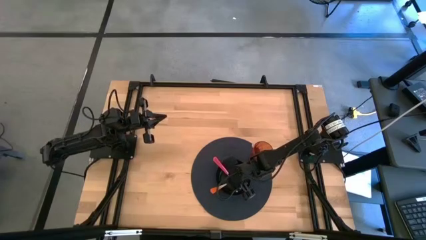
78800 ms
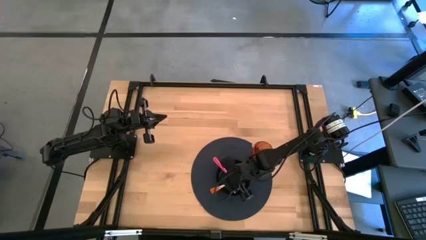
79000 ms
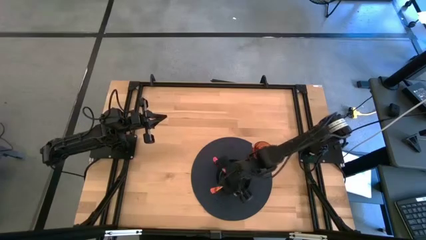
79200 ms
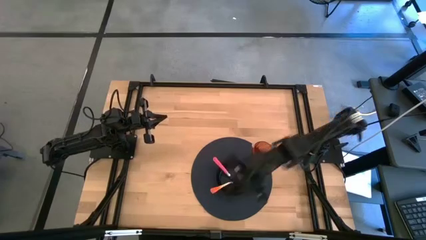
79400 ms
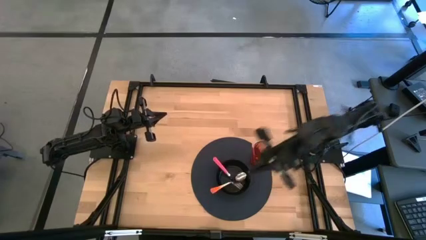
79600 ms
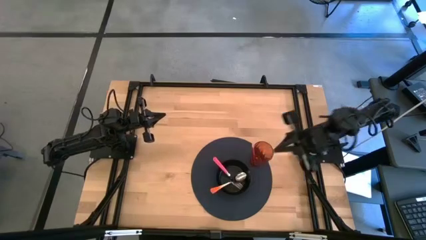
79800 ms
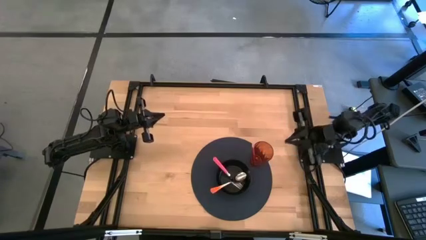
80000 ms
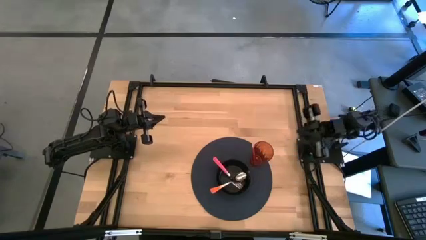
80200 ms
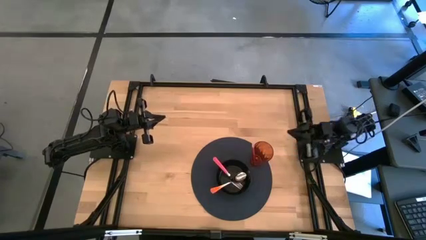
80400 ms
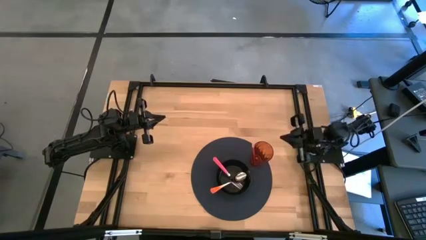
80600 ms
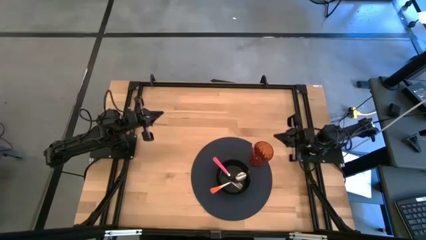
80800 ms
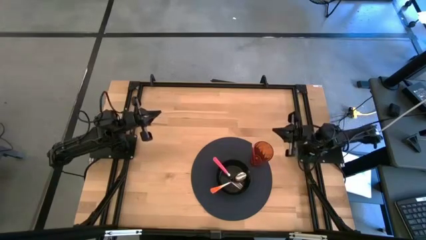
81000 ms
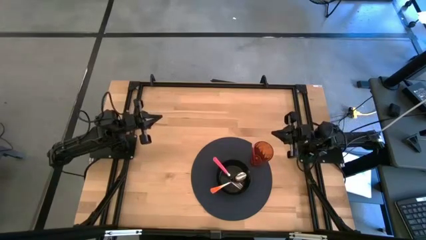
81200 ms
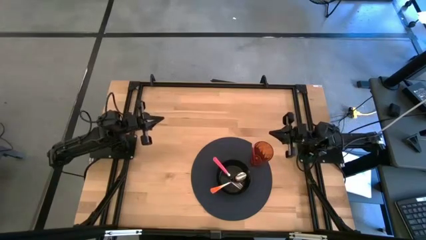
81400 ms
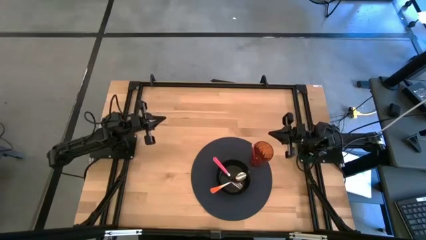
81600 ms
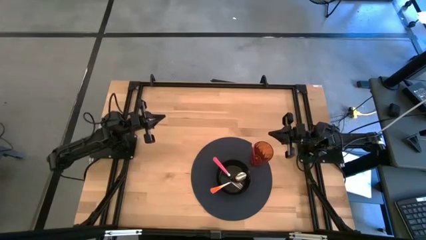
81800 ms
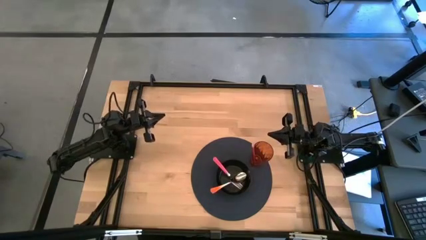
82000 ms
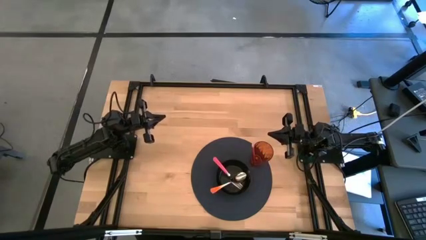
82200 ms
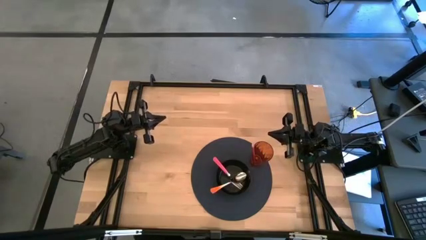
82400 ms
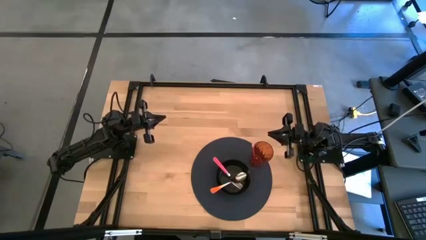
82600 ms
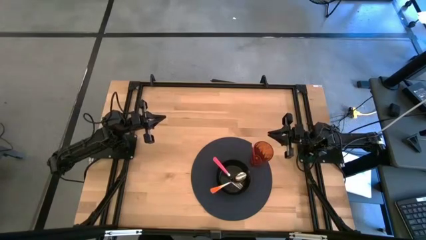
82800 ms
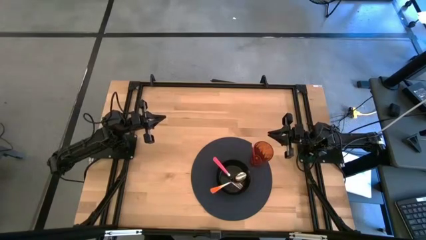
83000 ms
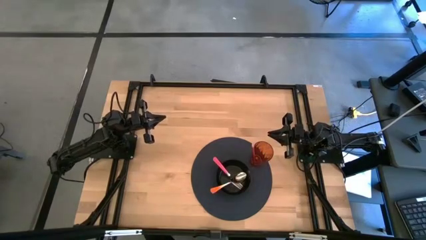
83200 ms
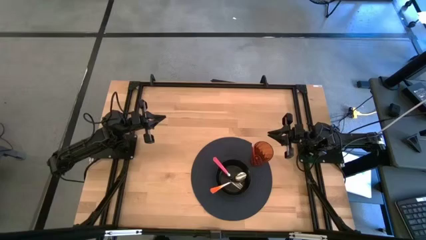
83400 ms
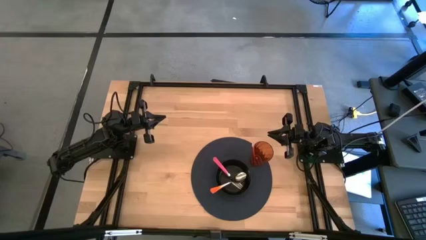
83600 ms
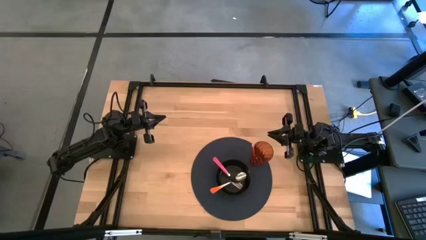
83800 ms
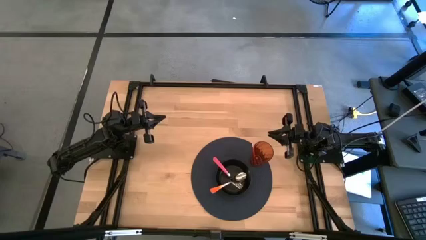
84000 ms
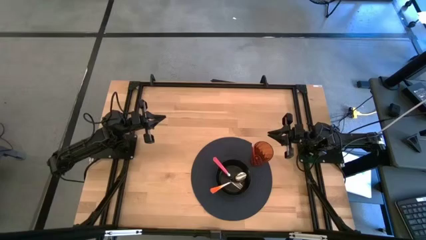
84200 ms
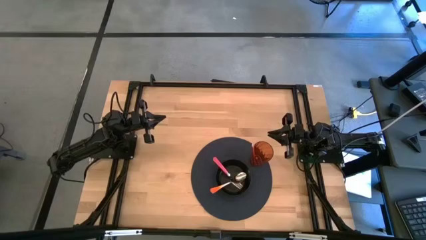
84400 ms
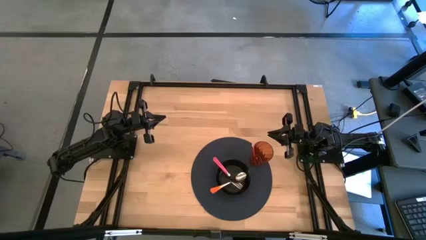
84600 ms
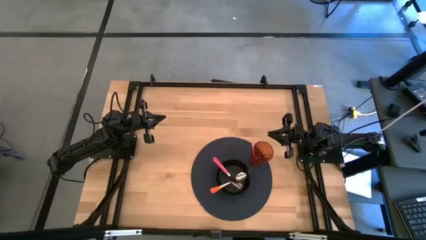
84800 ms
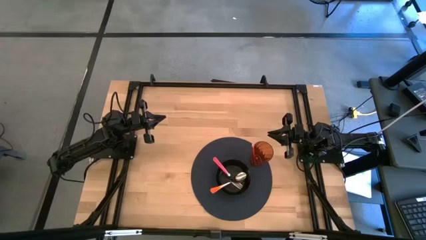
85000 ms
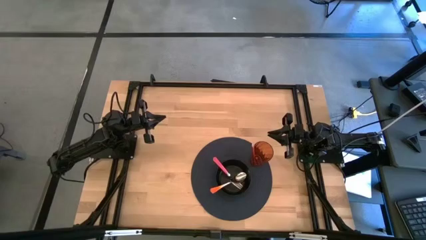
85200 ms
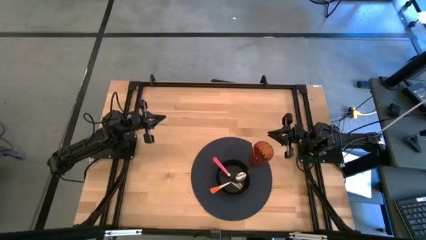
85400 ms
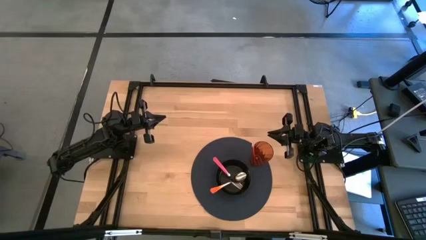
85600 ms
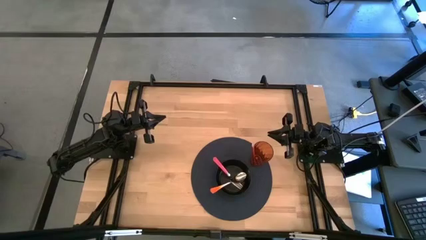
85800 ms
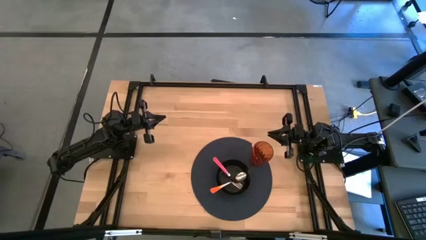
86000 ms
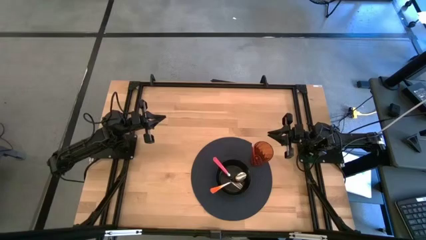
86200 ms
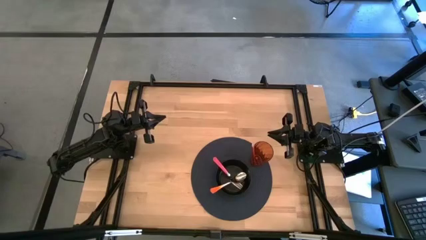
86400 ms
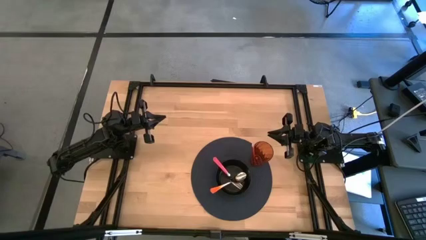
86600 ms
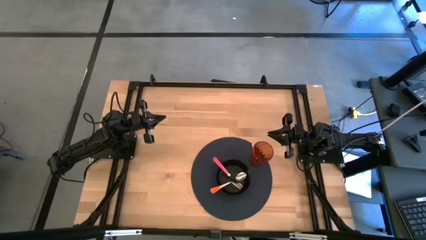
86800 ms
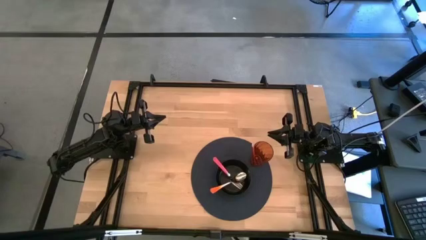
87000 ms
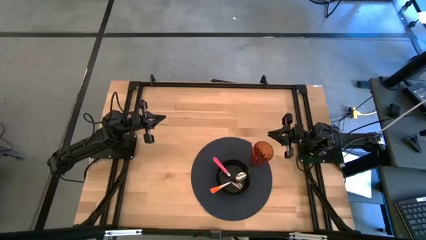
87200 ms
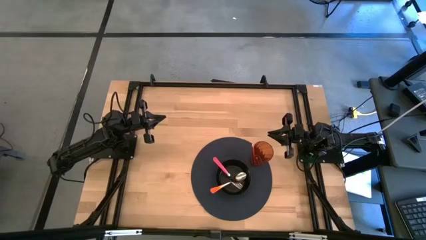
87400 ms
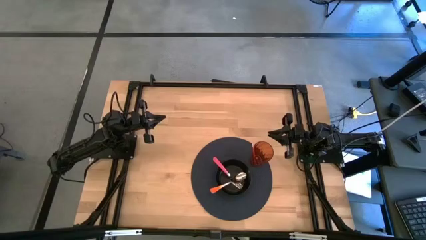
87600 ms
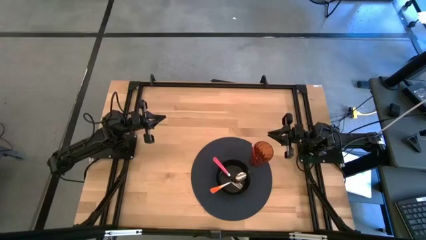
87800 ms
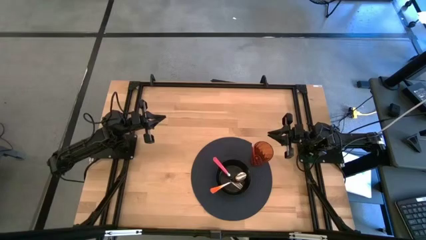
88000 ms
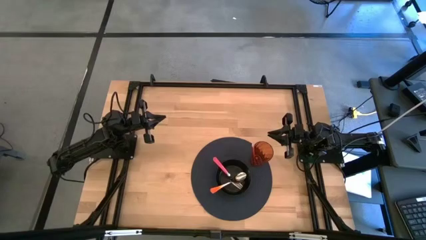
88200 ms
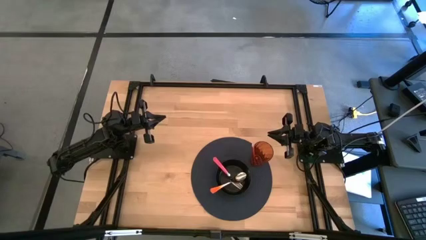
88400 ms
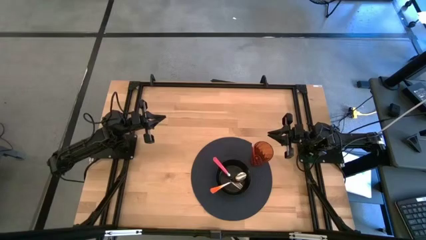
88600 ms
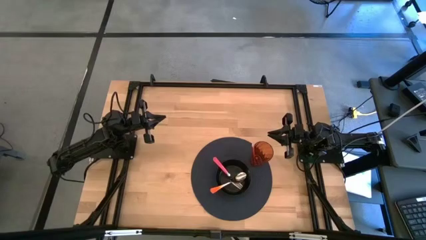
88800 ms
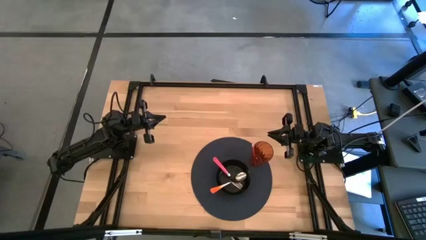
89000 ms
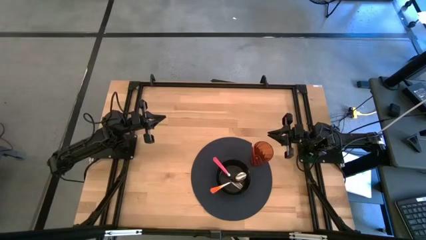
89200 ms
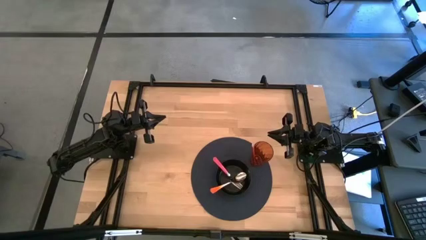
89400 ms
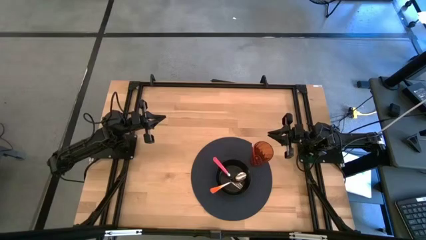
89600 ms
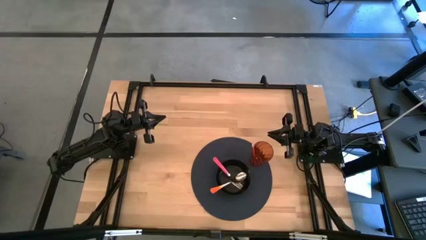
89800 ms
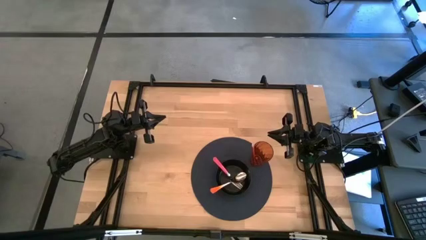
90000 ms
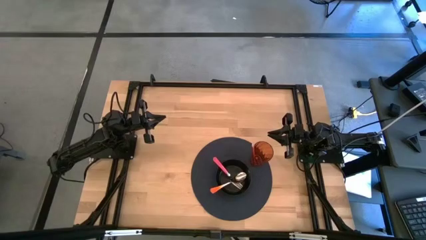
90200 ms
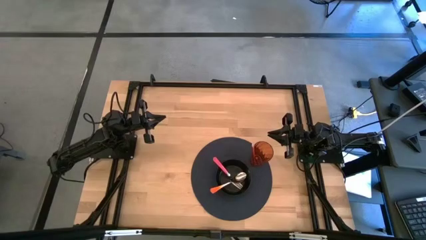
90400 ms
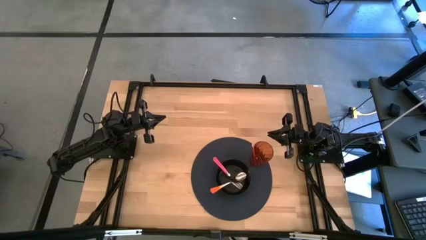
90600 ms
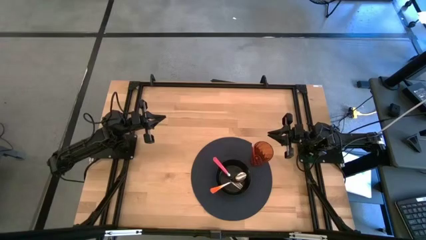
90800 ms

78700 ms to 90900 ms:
Task: Pick & Place Utensil
Return to Home Position

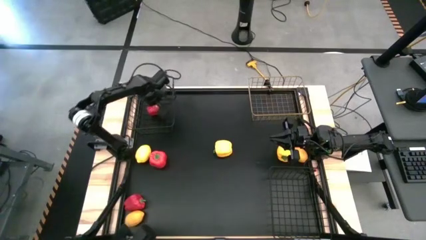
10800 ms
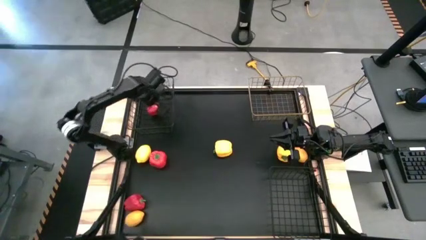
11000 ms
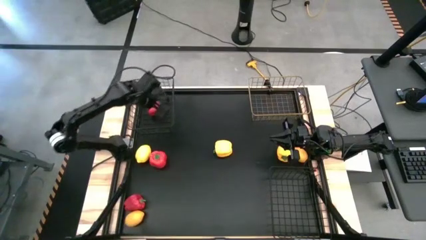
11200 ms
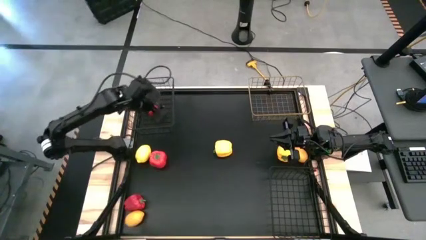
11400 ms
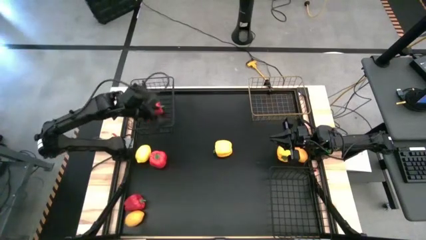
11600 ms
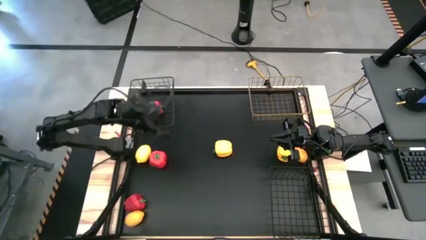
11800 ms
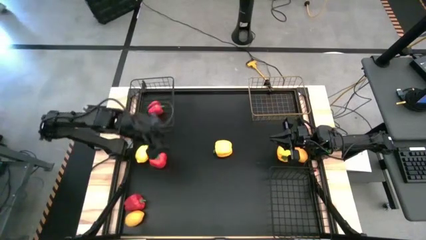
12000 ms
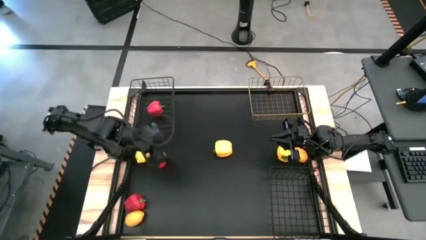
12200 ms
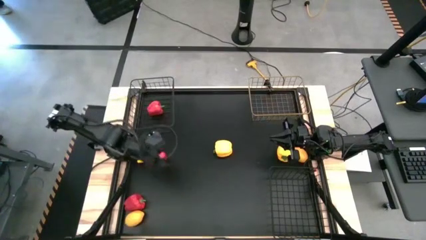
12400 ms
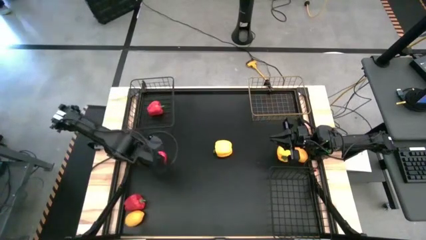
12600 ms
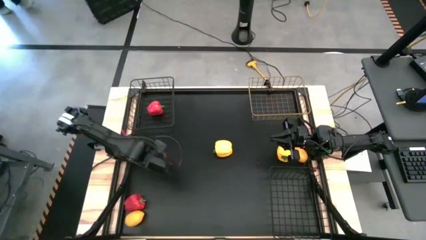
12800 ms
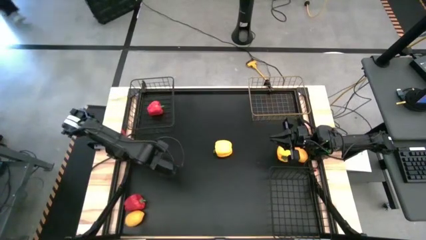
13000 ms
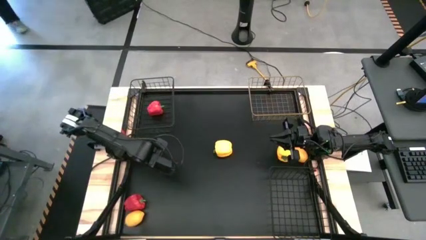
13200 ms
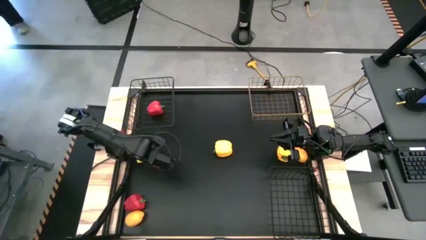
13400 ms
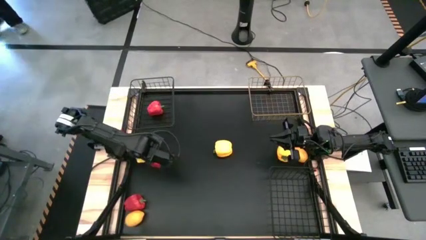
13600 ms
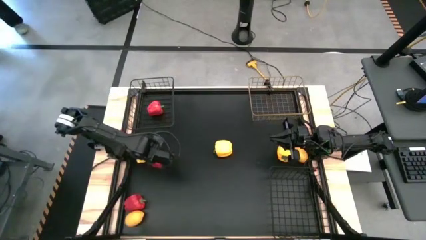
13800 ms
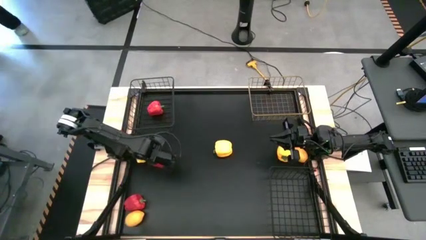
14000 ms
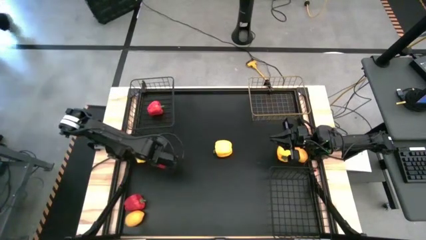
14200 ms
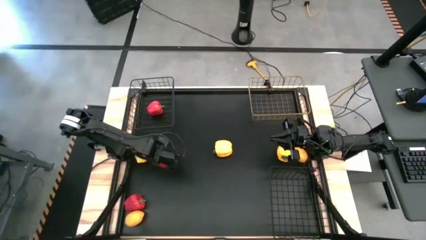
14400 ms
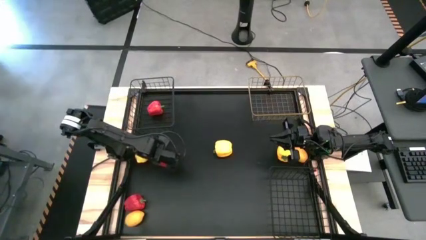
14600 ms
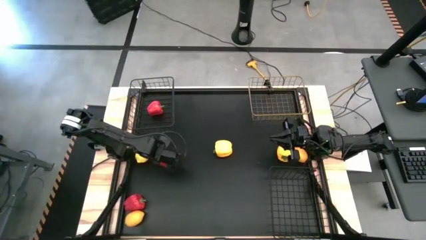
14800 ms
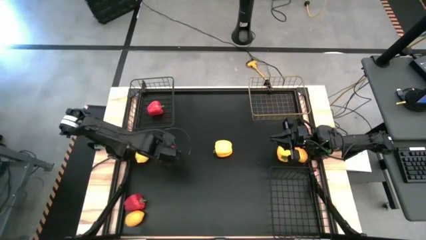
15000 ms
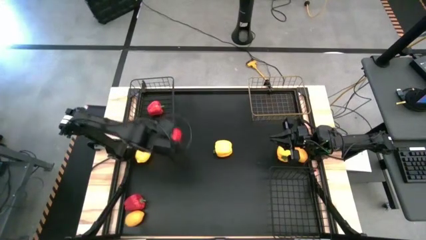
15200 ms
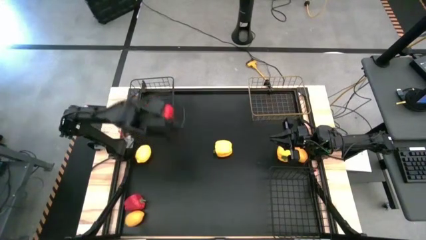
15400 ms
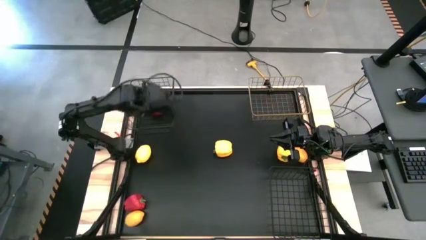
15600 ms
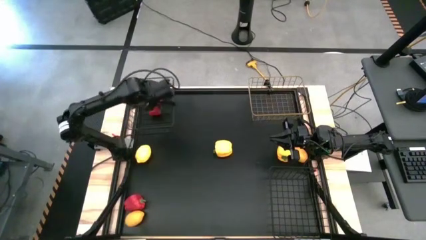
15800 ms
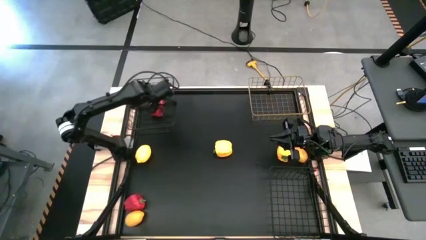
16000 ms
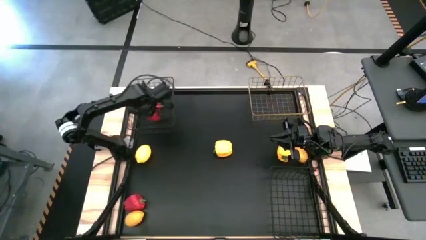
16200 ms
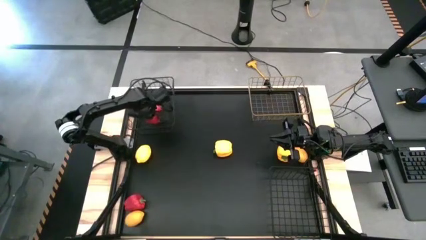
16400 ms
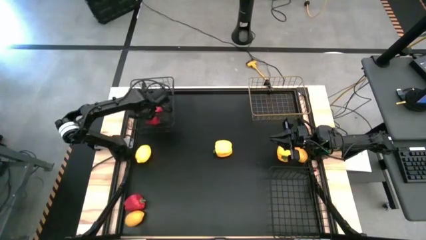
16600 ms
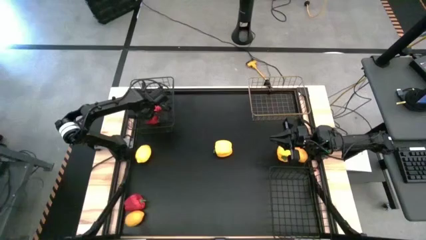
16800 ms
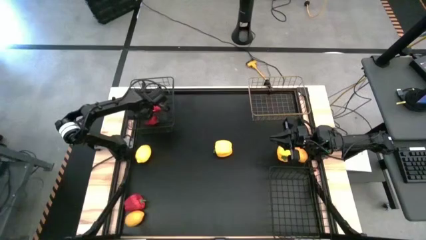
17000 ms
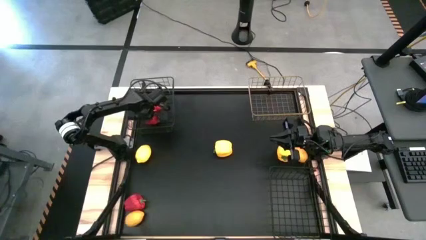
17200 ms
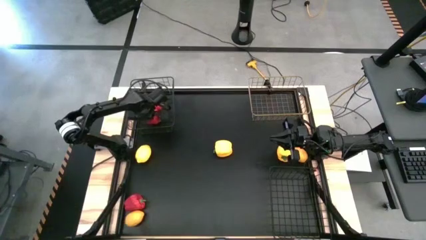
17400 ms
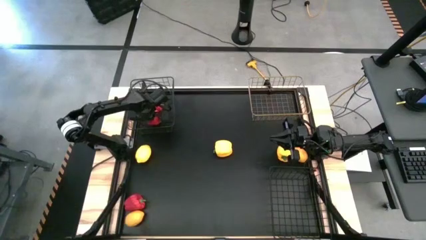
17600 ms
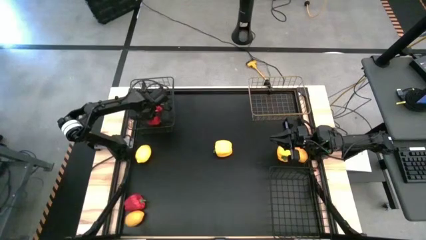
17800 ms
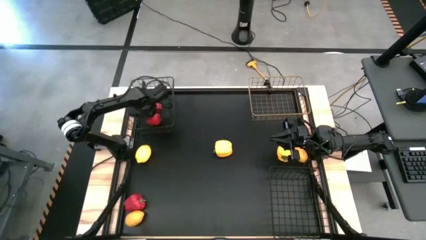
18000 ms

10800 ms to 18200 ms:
Task: Sort produce into baskets
Put the top red bell pepper into the top black mesh basket
